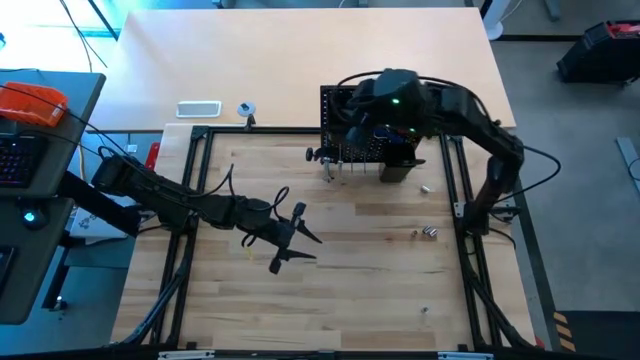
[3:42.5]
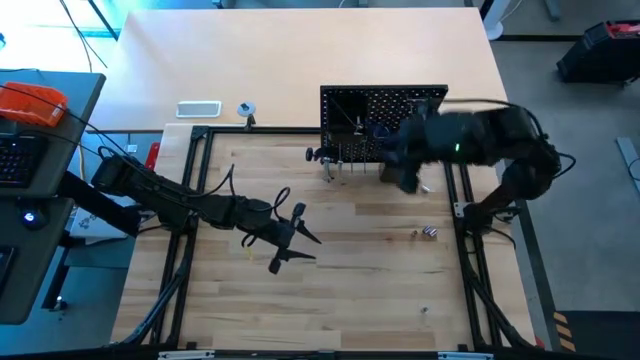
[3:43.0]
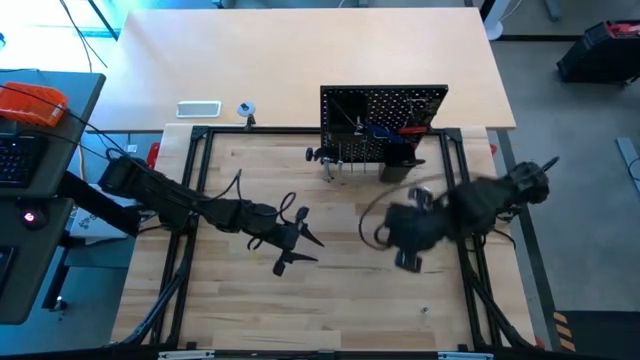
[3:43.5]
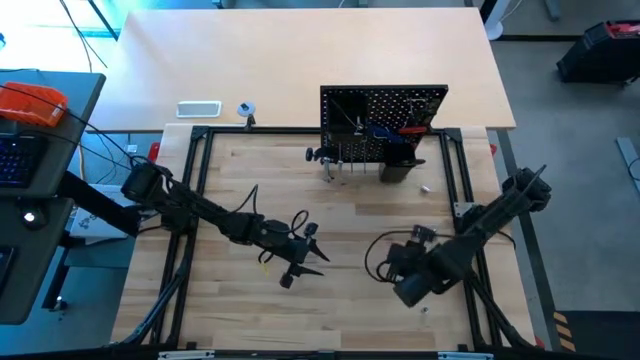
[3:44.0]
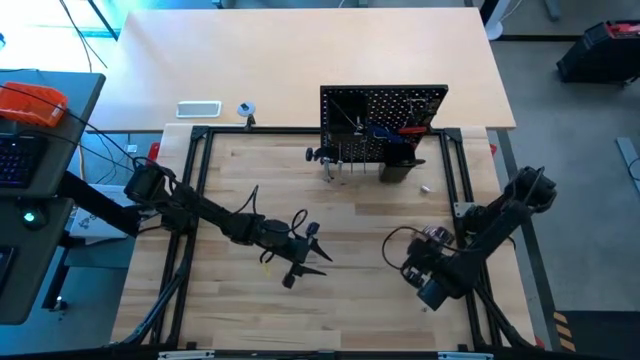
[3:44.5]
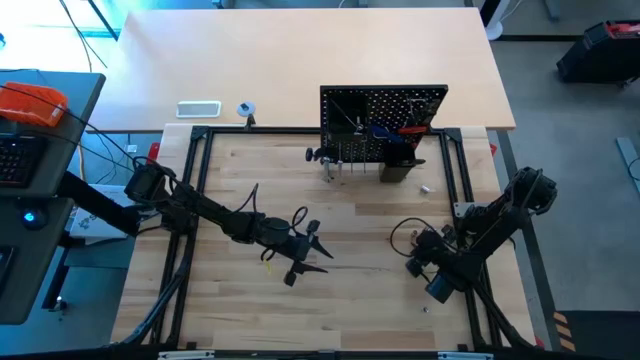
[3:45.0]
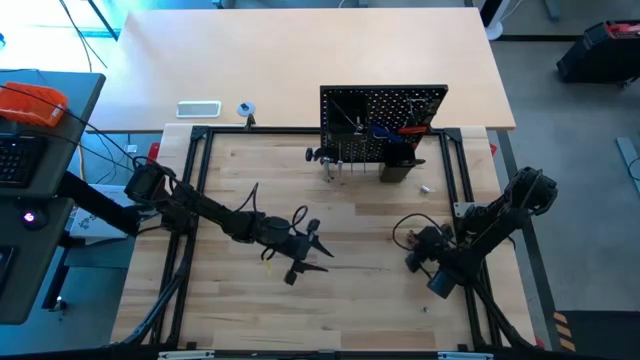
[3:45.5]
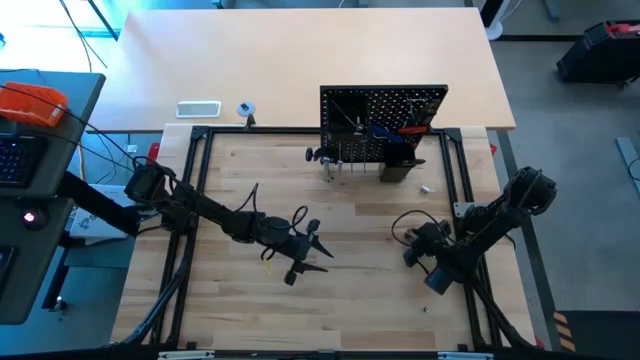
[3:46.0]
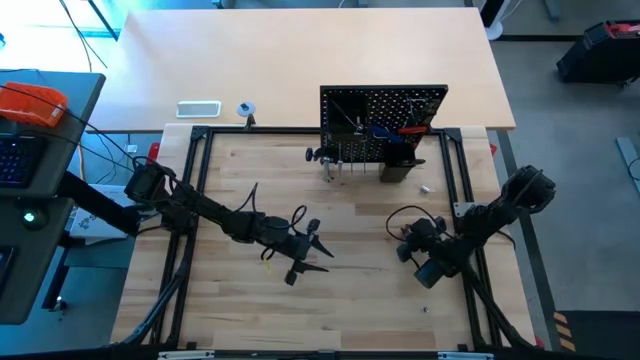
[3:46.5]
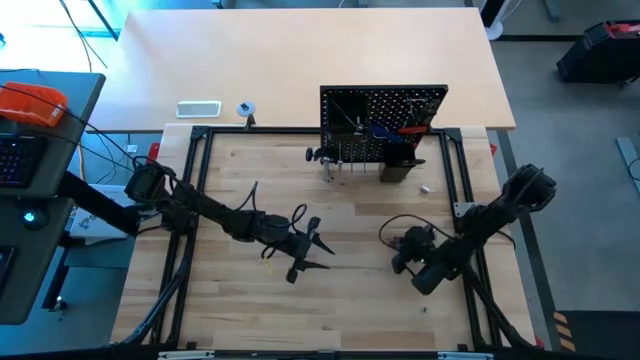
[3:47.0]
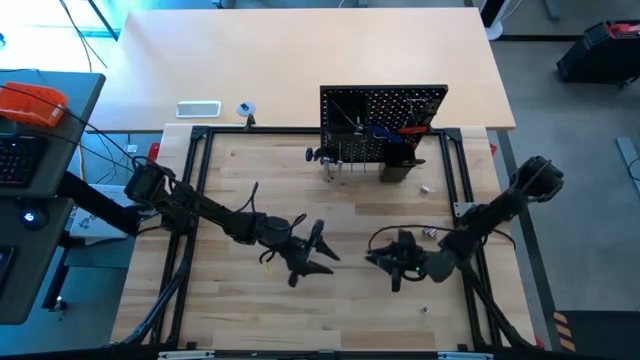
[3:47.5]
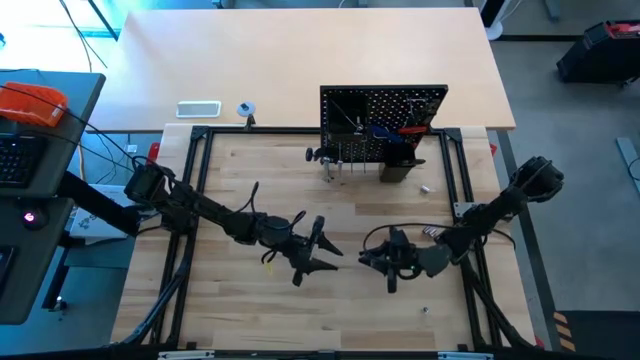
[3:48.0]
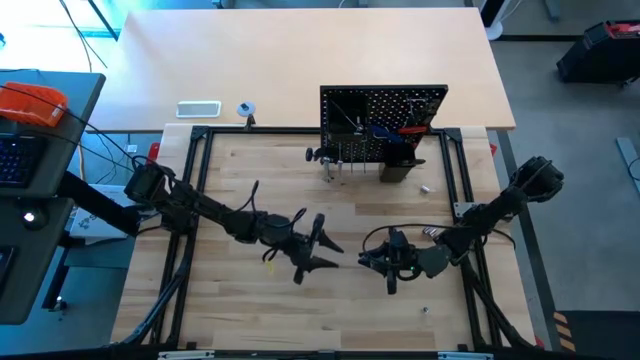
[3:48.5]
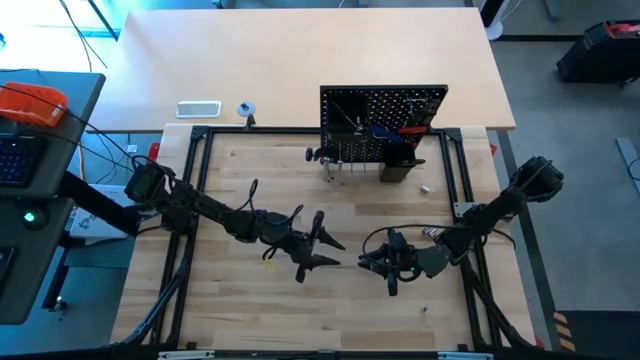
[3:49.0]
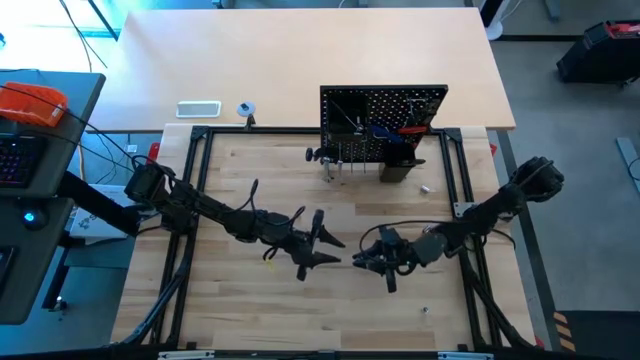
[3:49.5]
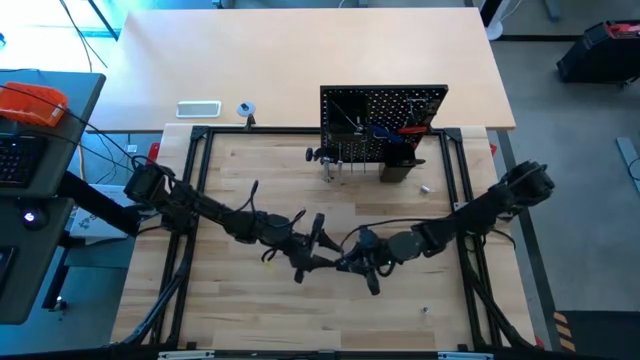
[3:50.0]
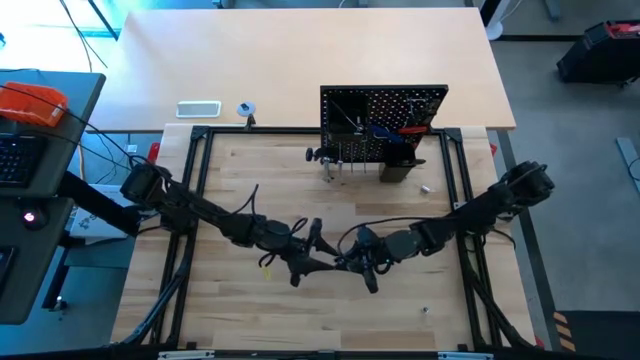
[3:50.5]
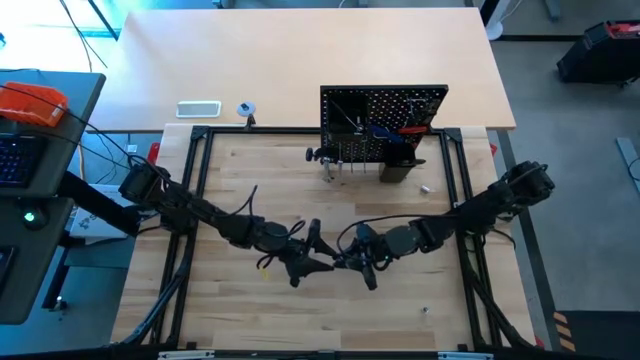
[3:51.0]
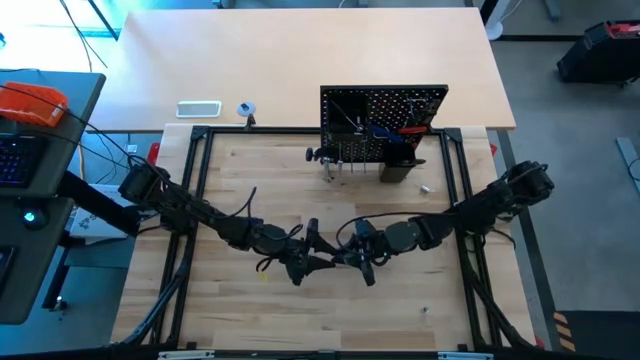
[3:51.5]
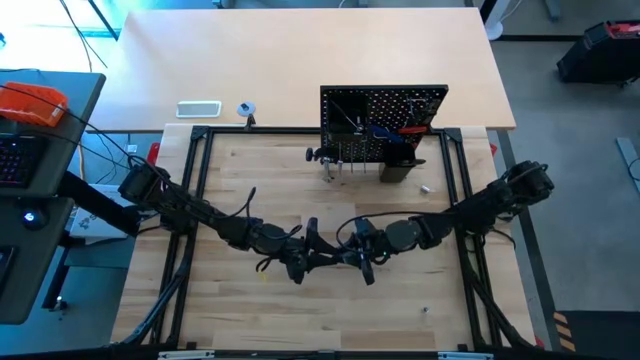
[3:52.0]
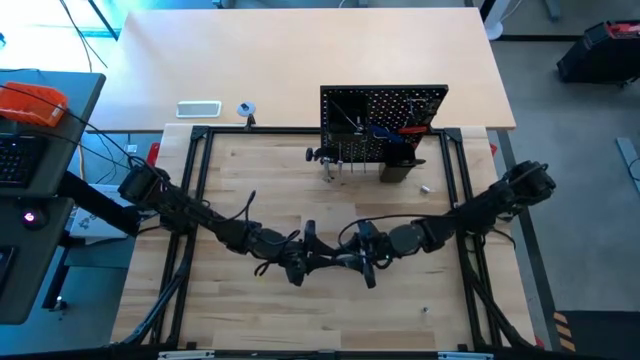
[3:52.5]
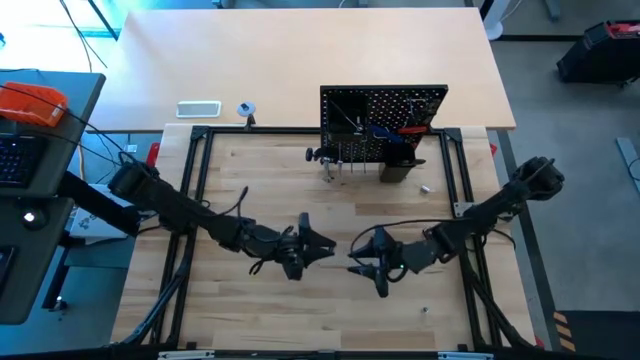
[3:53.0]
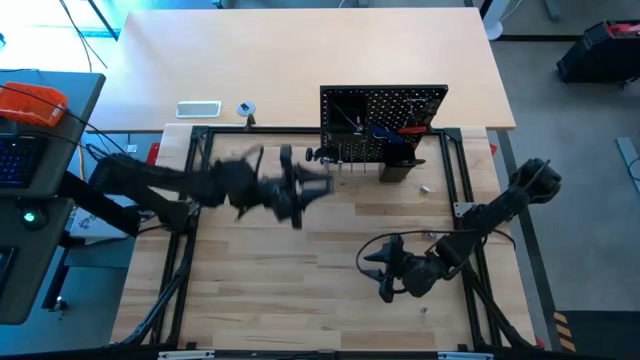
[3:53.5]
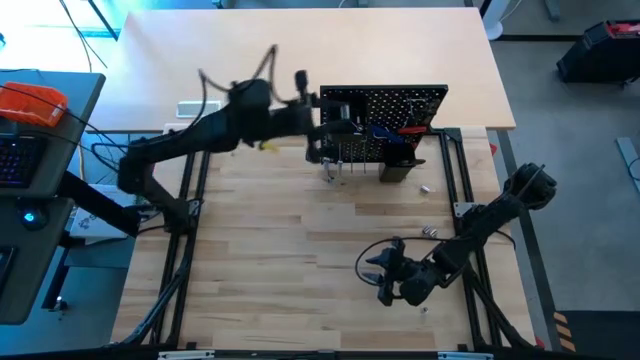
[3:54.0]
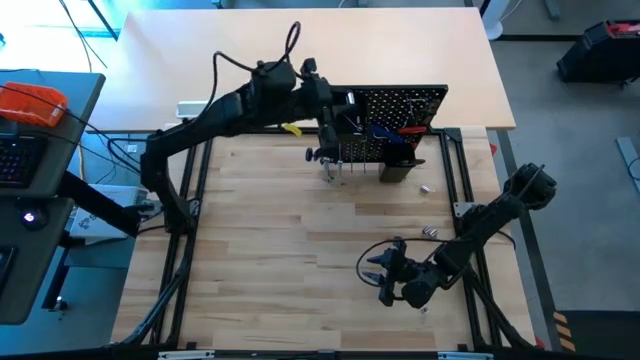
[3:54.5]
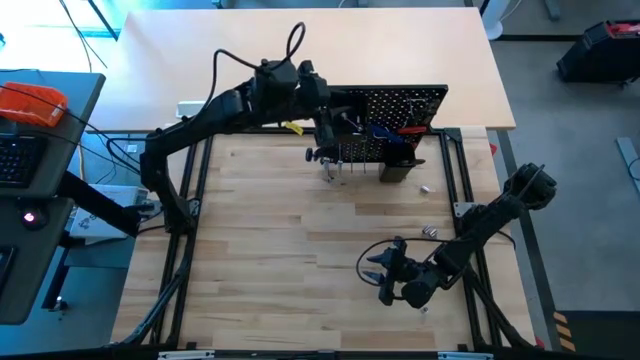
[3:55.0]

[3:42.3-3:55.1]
Task: Hang tools onto peg board
Hang the silver socket onto the pegboard

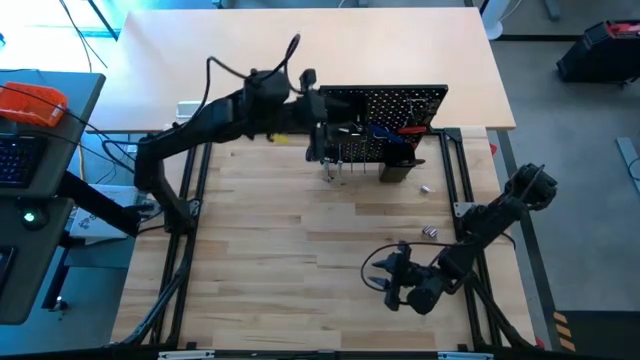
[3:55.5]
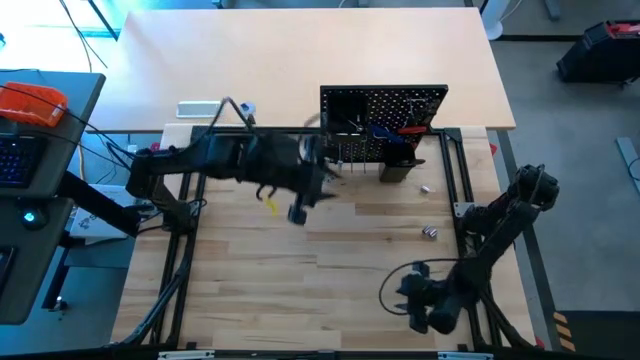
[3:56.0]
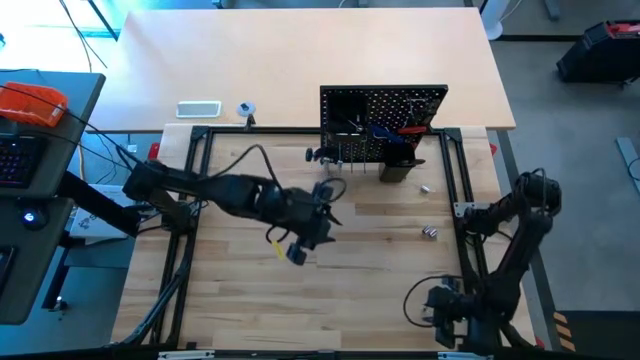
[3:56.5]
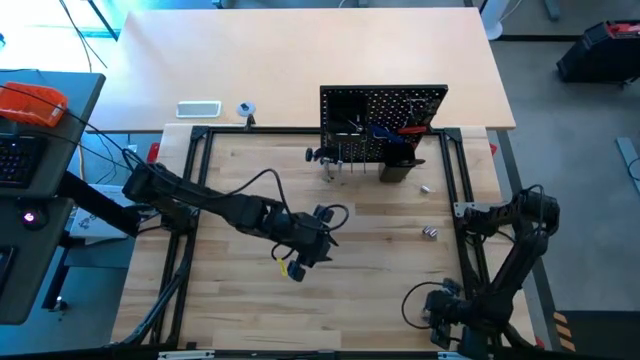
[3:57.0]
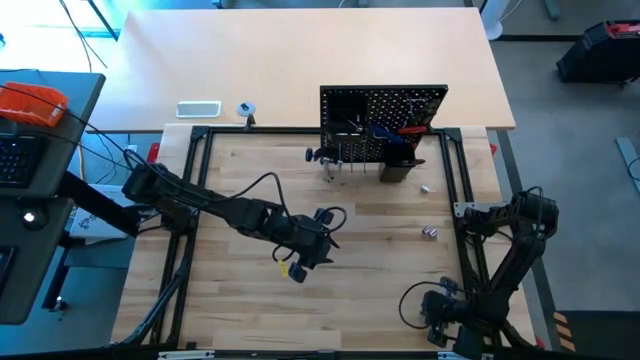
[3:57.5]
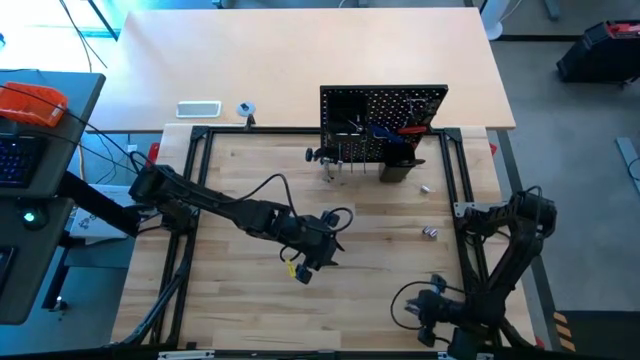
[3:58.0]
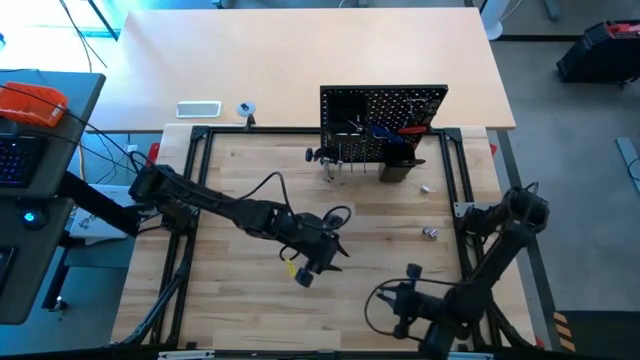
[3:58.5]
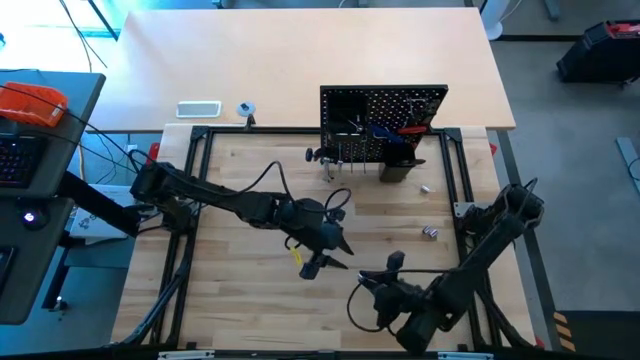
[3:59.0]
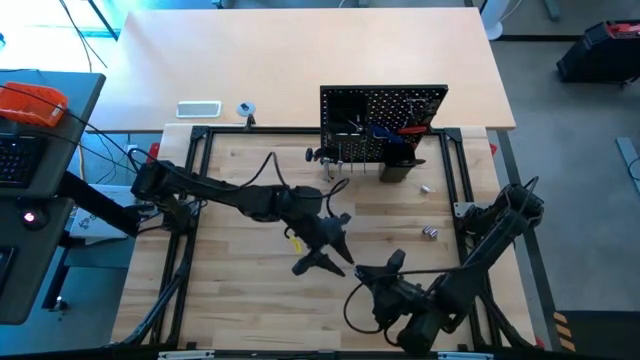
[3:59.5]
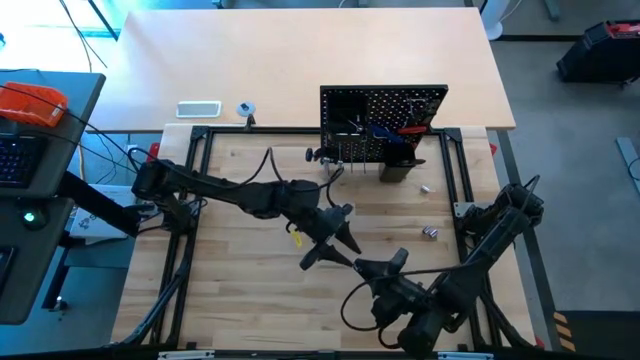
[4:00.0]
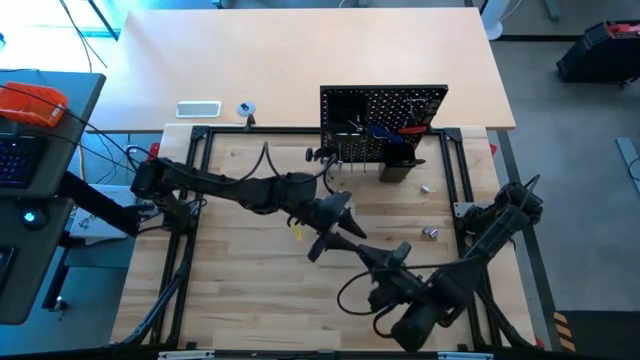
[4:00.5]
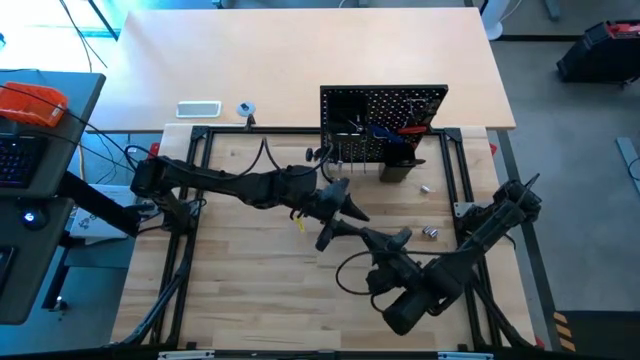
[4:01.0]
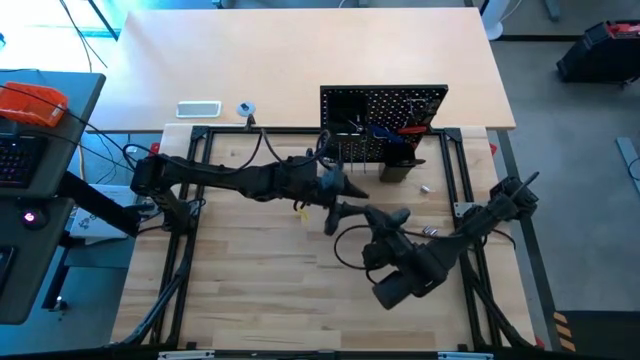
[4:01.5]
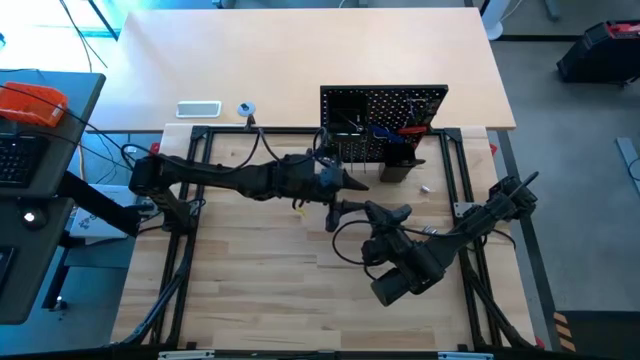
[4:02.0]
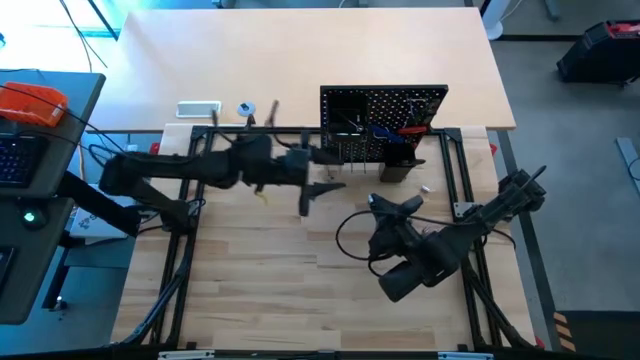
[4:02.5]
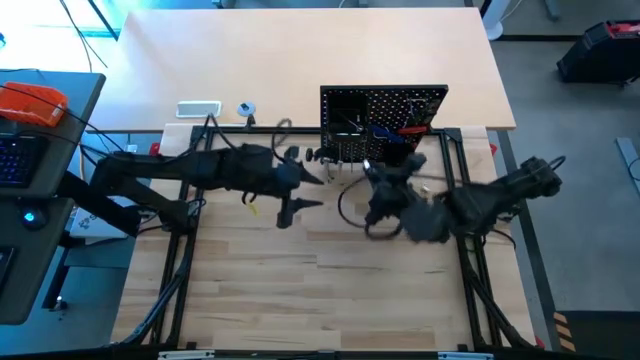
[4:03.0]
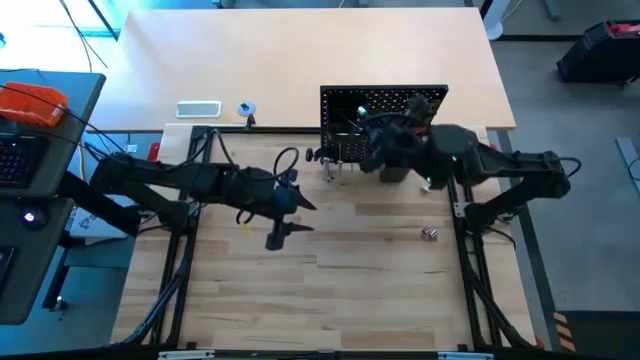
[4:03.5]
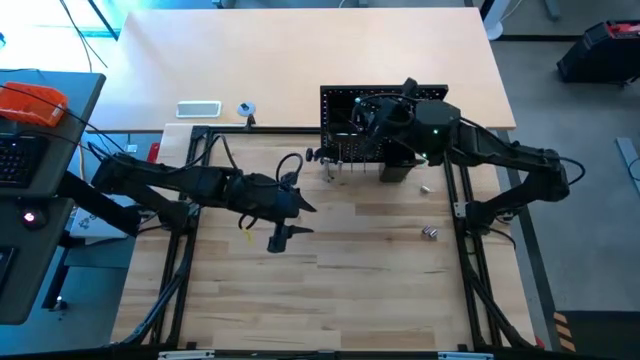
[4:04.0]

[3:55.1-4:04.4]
Hang the silver socket onto the pegboard

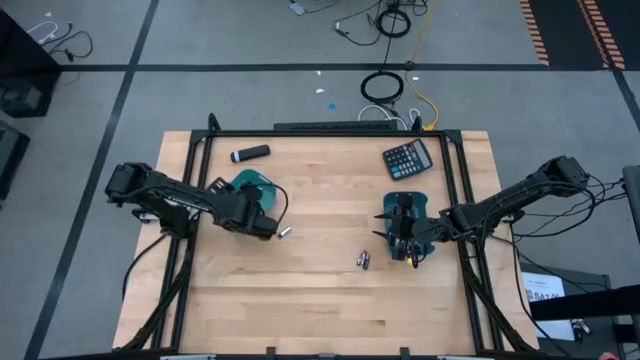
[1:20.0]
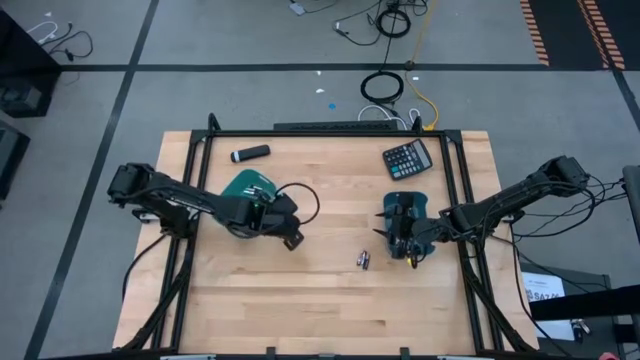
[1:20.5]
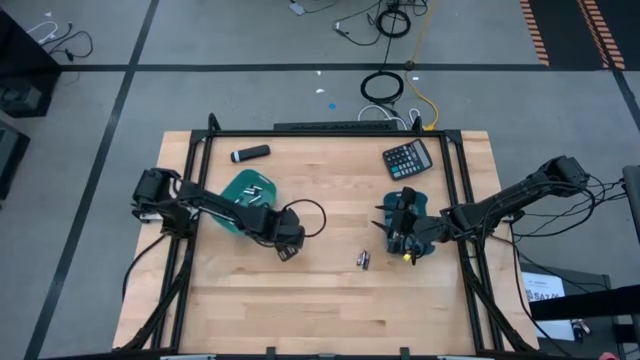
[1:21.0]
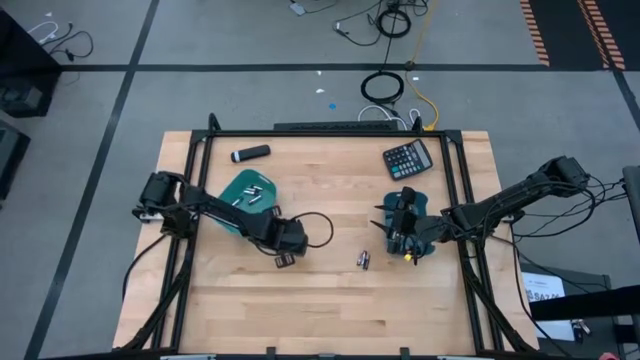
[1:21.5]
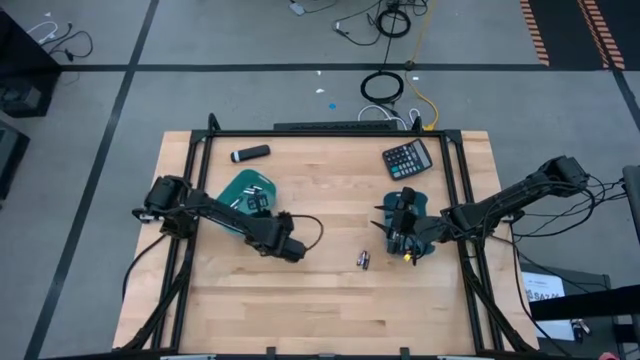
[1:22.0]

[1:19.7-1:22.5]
Task: Sort batteries
Put the silver battery into the green bin
